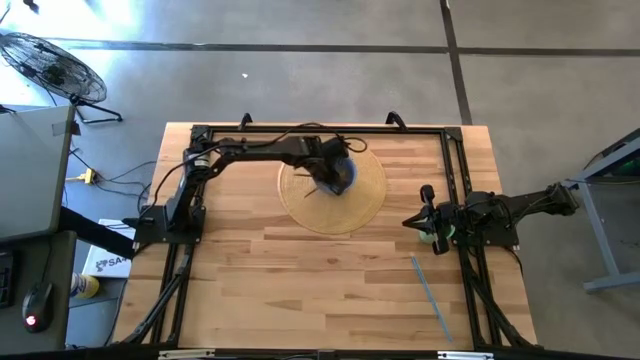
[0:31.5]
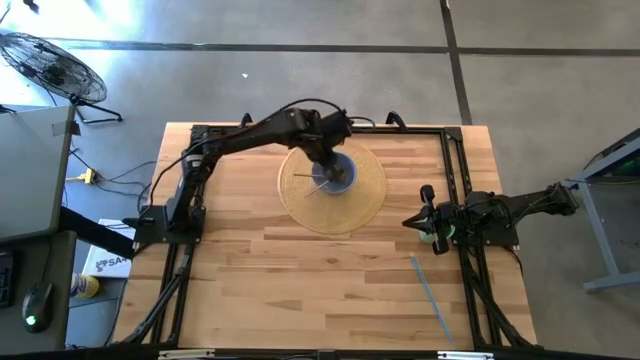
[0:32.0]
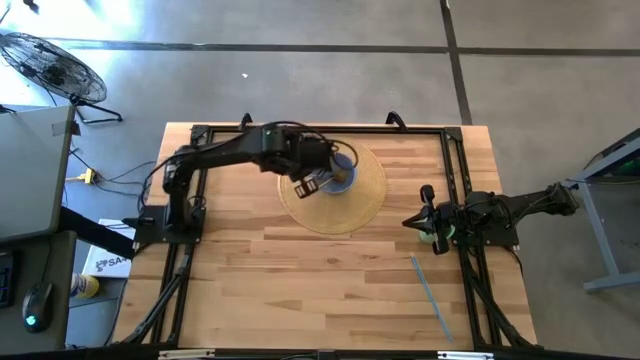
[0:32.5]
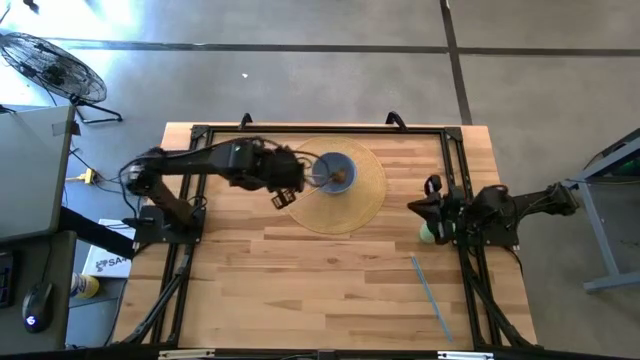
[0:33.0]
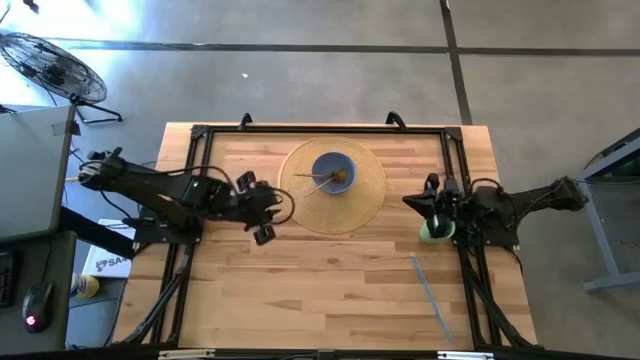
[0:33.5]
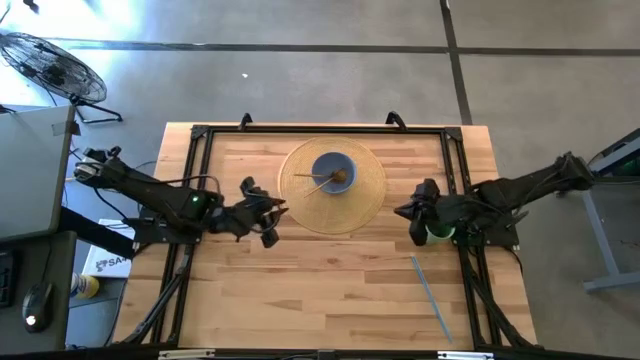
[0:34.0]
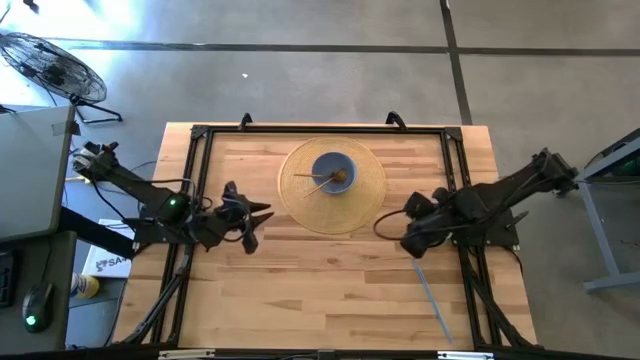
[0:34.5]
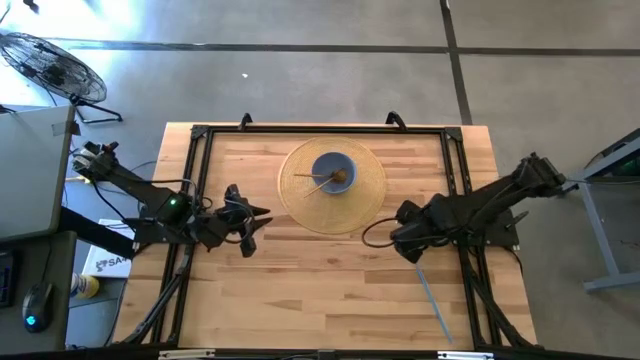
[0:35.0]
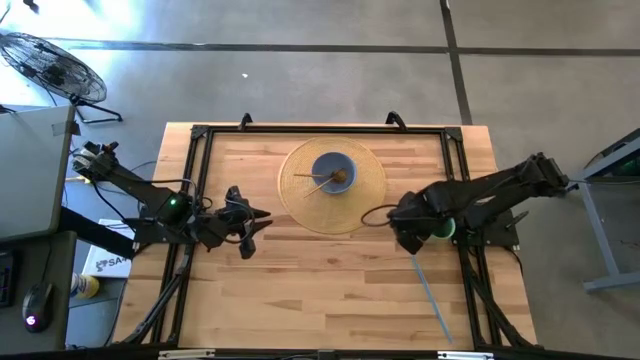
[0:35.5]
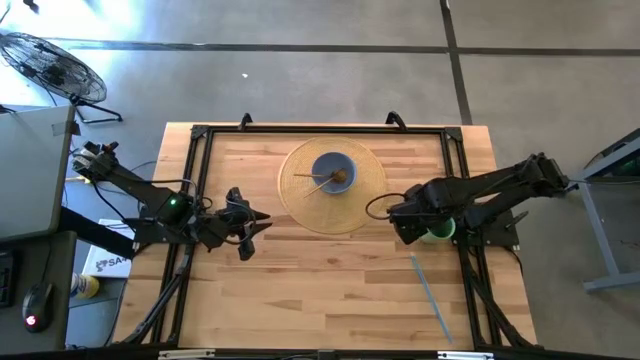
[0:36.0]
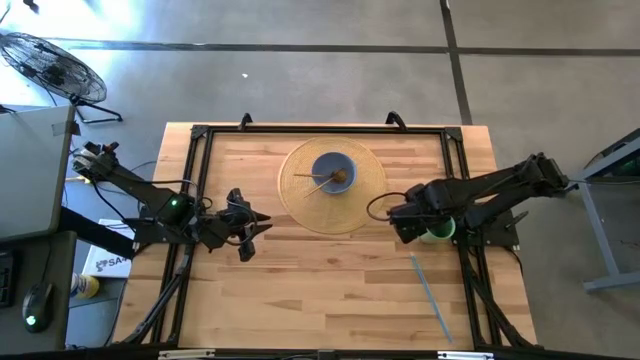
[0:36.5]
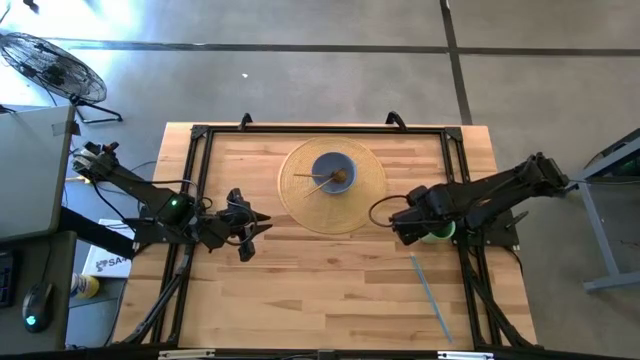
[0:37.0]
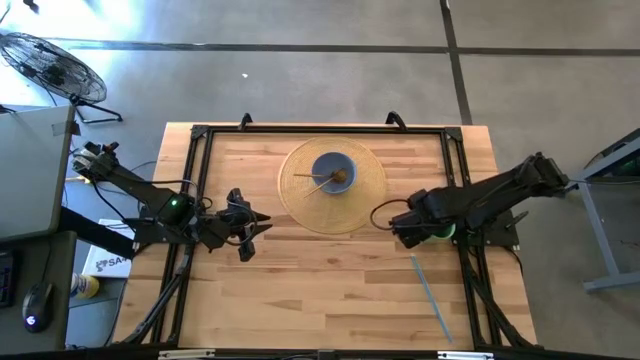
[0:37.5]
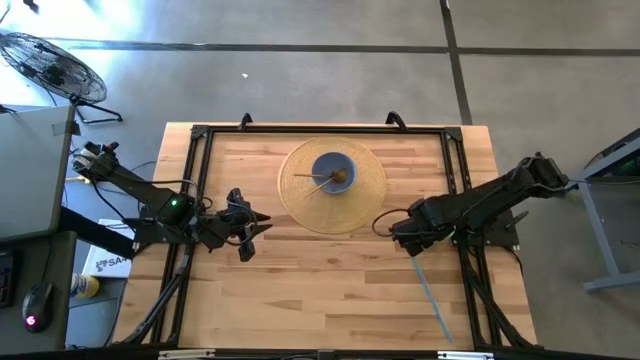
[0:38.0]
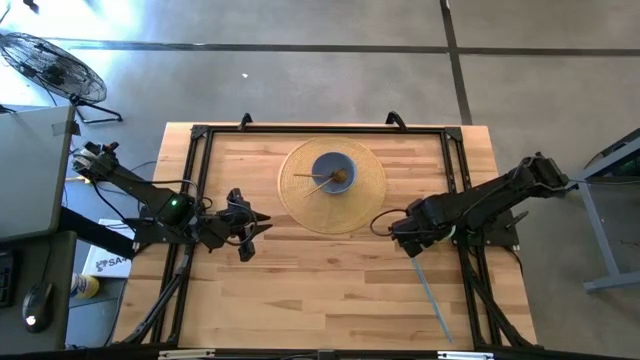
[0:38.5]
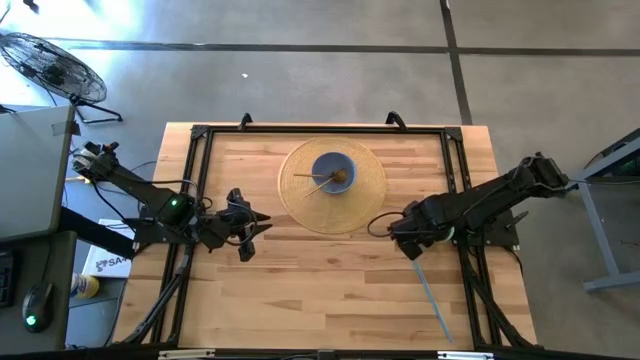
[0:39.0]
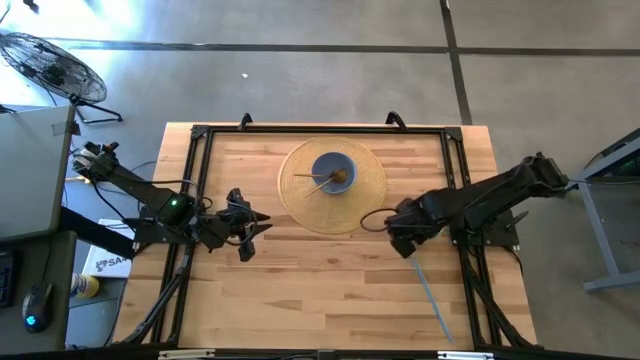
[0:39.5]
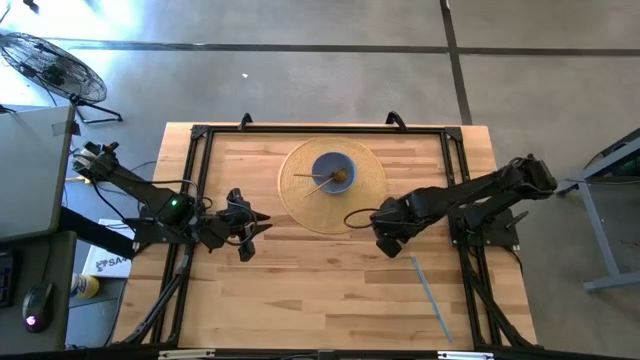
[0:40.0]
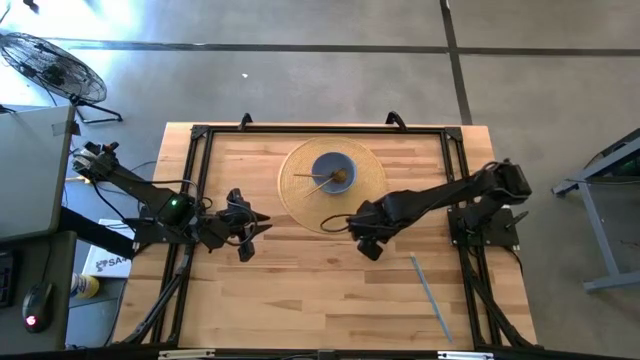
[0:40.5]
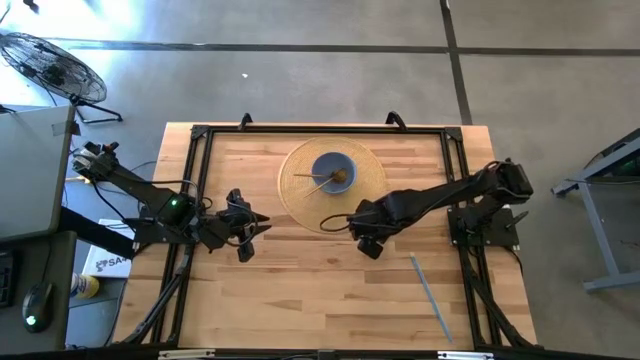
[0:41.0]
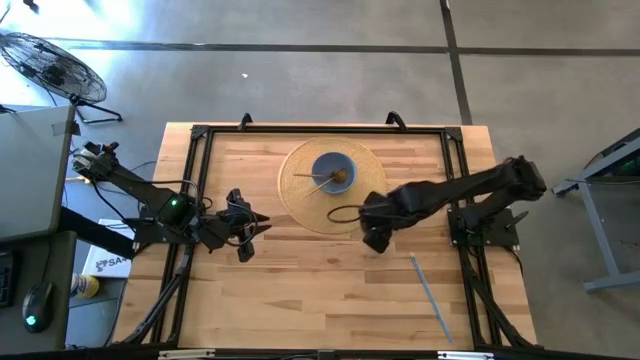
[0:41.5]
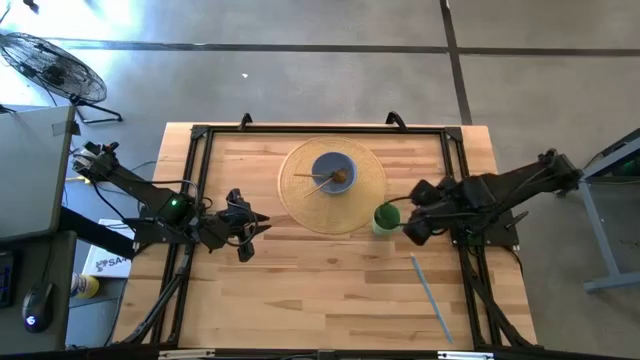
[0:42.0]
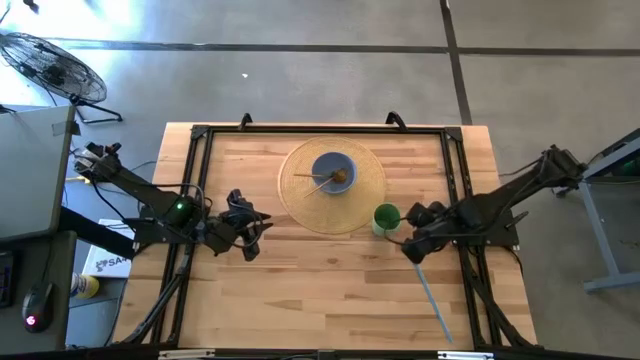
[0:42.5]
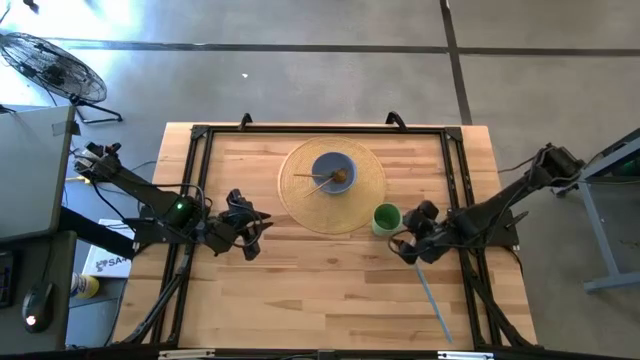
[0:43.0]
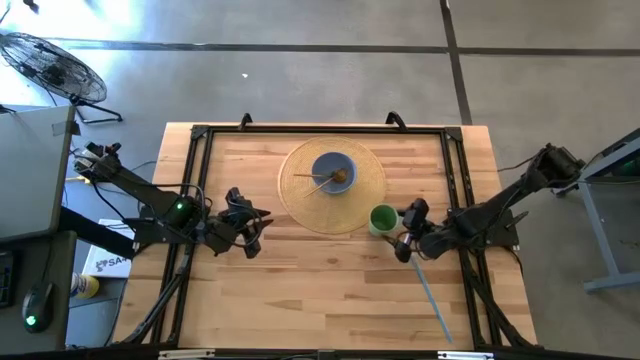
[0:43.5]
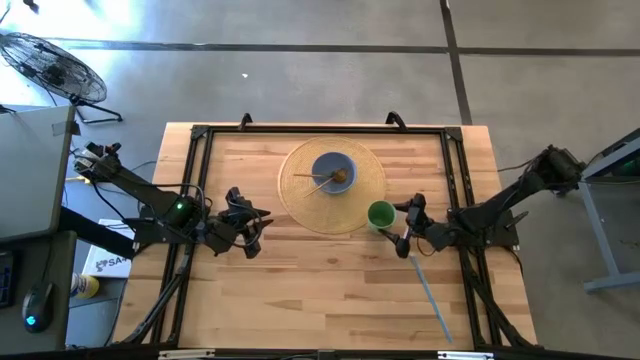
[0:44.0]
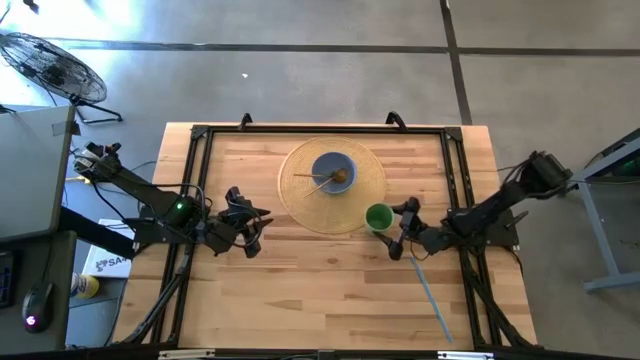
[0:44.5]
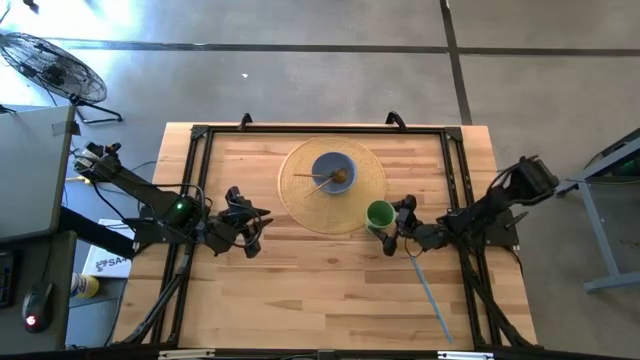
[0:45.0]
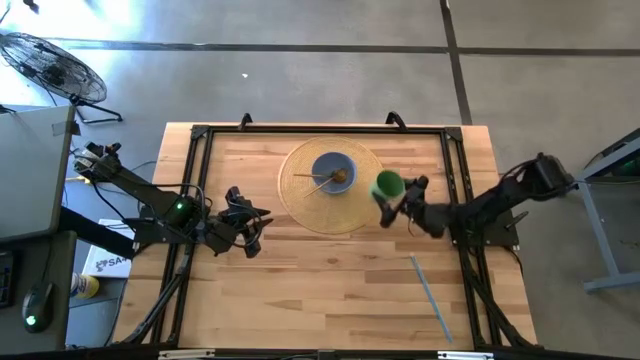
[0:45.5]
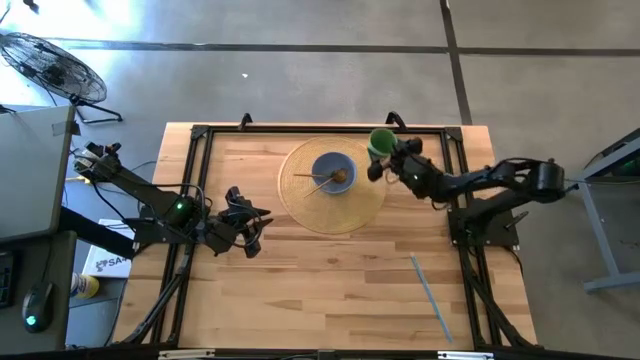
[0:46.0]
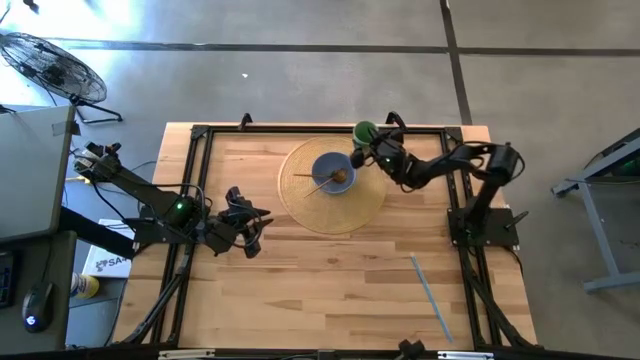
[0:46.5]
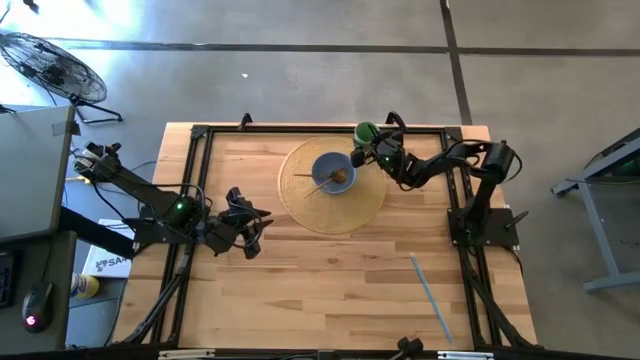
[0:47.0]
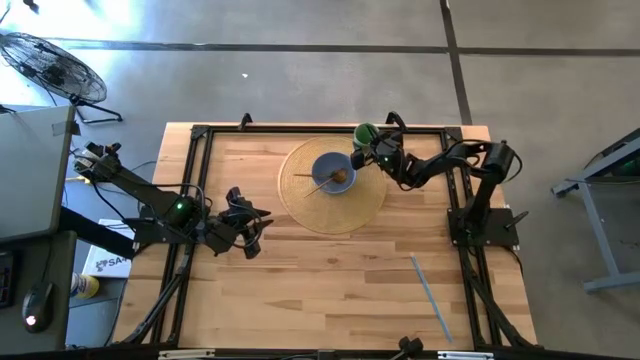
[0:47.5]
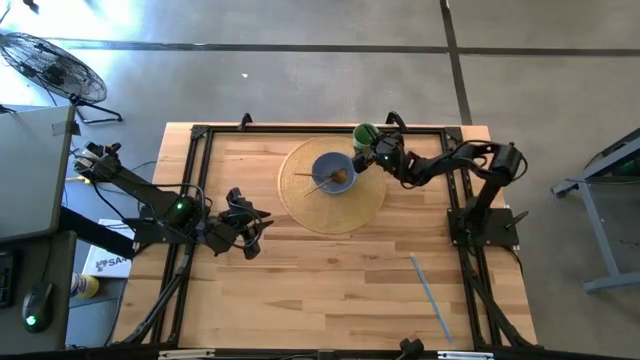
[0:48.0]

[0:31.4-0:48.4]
Task: Pick & Place Utensil
Put the green cup on the brown mat to the top right of the blue bowl

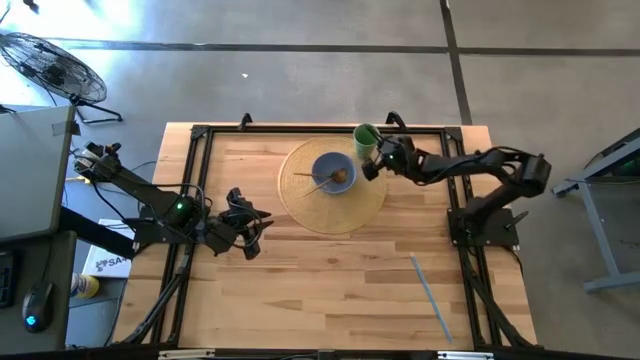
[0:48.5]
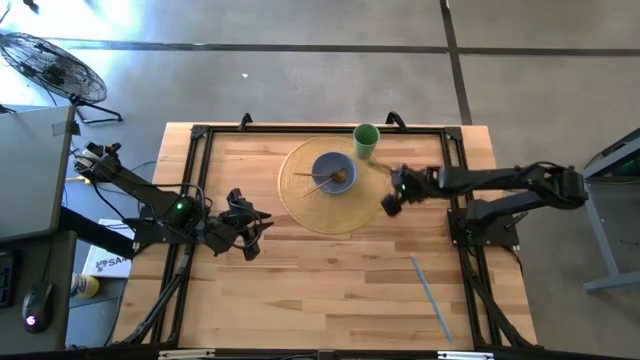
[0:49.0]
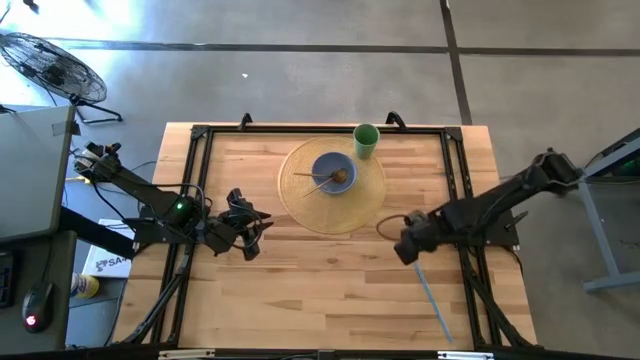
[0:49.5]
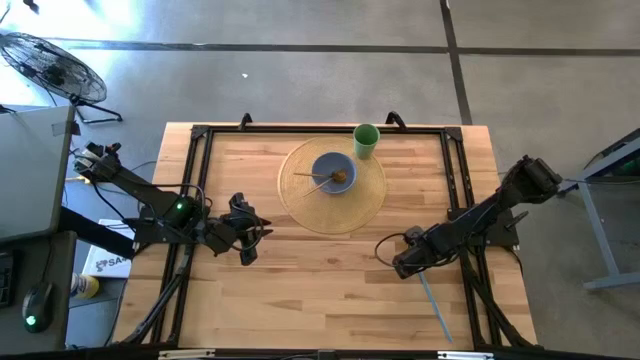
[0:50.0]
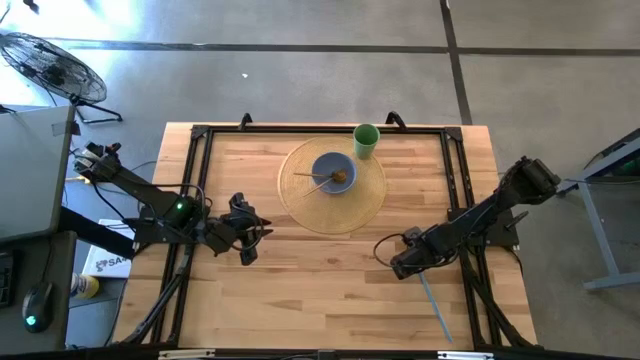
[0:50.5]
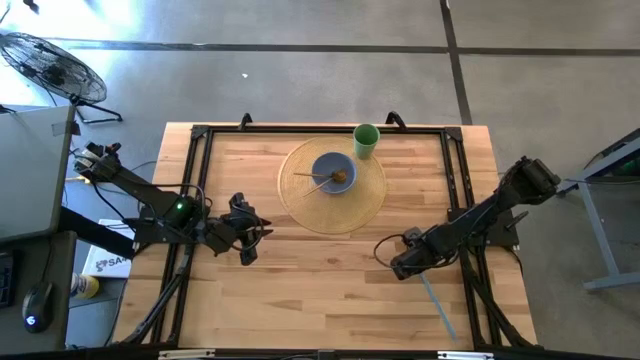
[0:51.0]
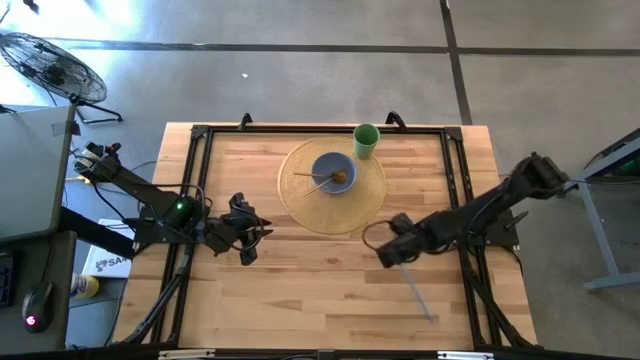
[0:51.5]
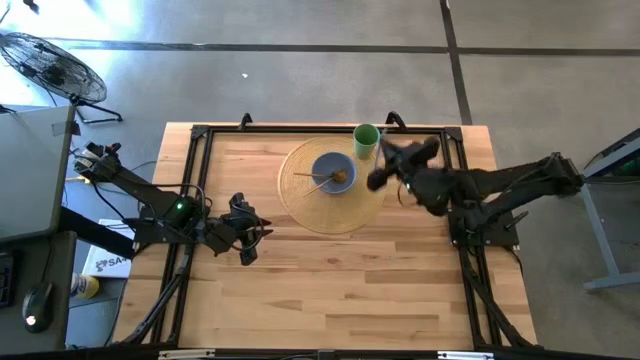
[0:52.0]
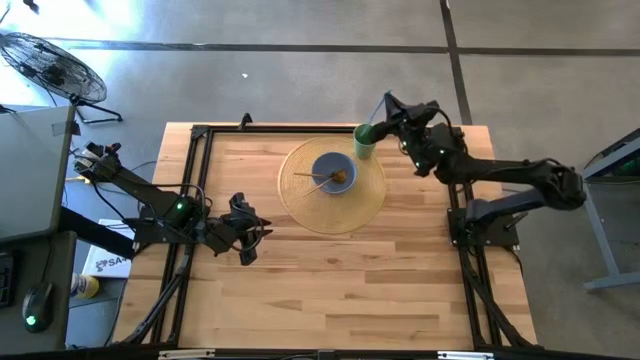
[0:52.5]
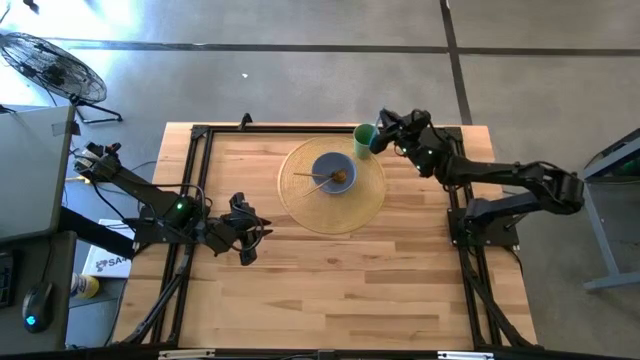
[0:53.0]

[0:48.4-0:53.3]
Put the blue straw into the green cup on the brown mat

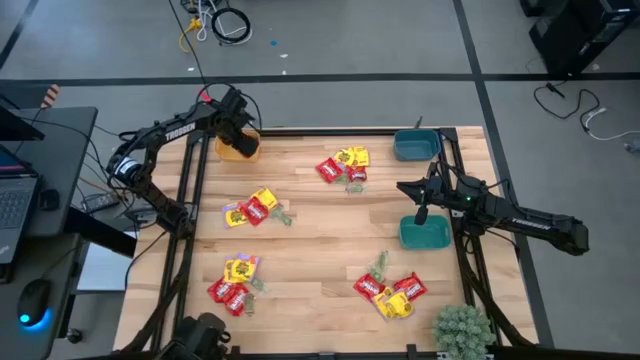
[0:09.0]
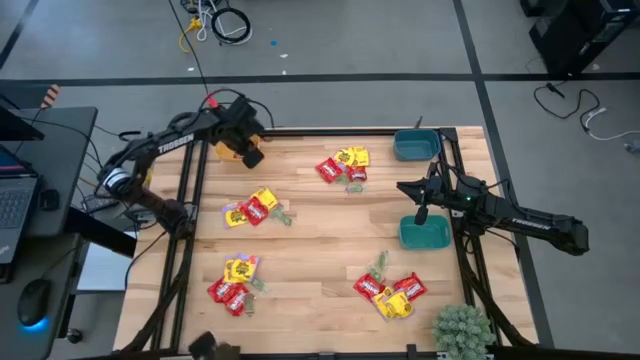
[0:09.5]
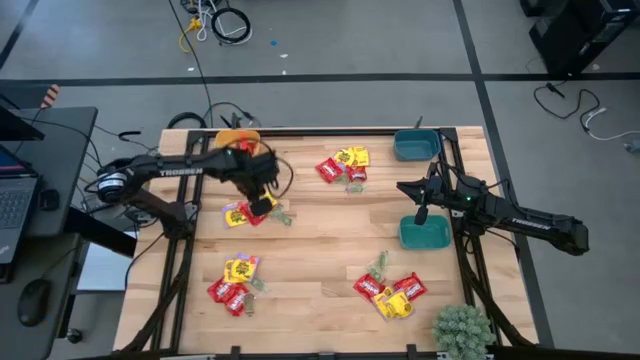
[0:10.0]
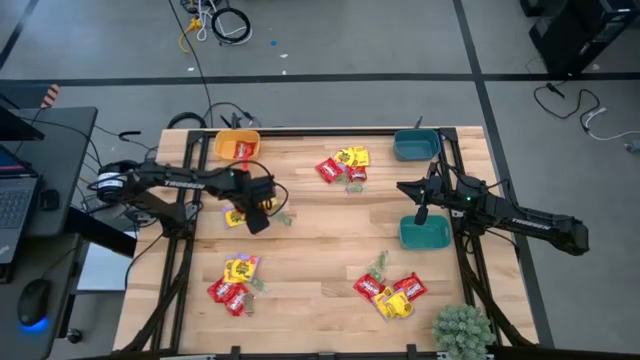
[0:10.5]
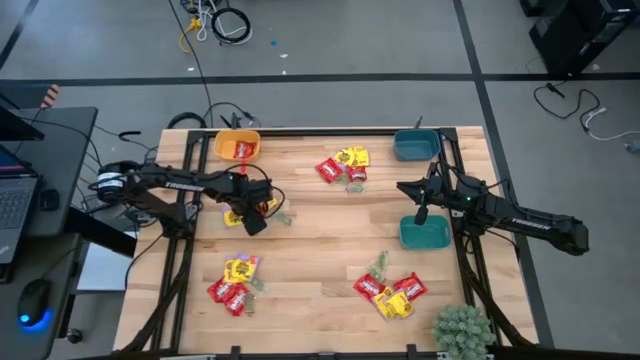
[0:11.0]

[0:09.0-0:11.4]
Task: Sort candy
Put the red candy into the yellow bin
